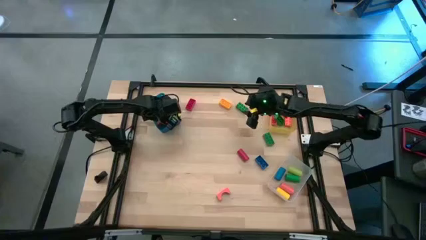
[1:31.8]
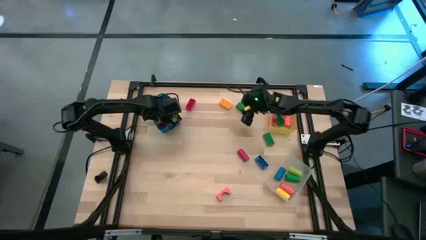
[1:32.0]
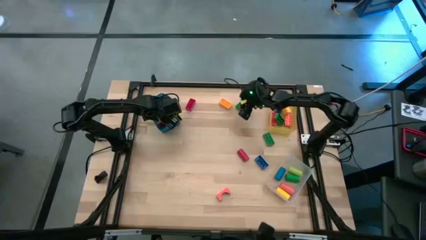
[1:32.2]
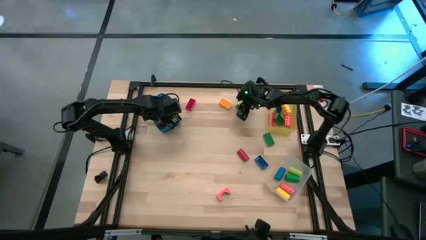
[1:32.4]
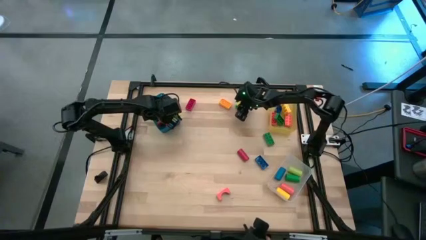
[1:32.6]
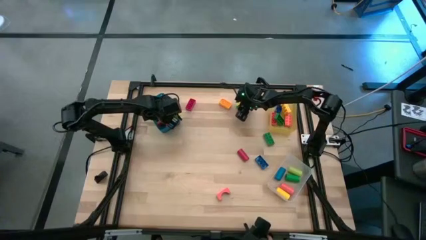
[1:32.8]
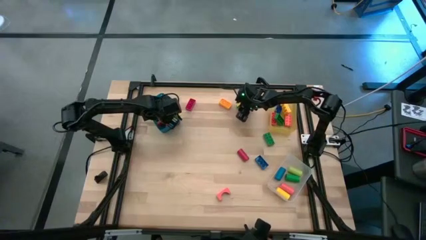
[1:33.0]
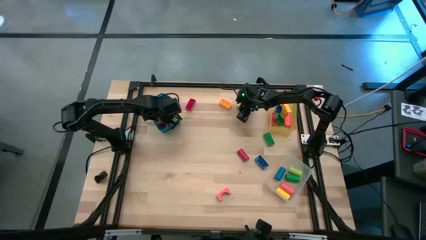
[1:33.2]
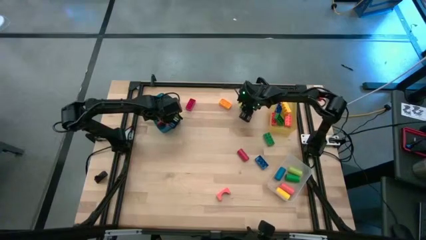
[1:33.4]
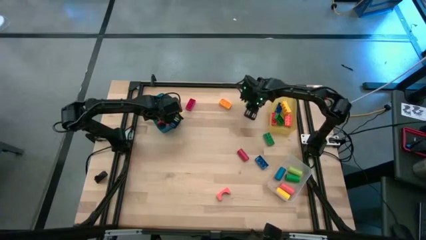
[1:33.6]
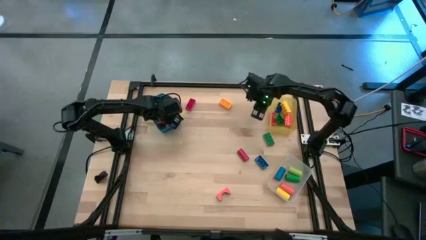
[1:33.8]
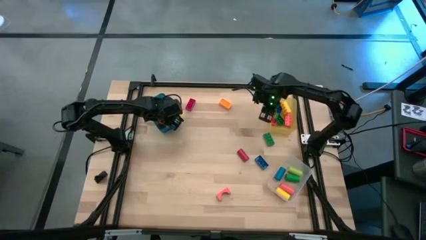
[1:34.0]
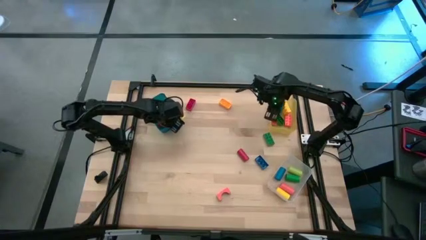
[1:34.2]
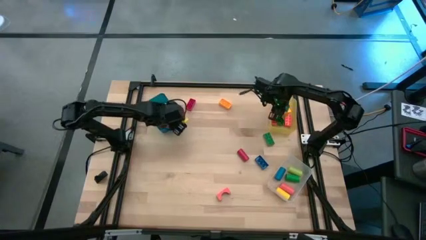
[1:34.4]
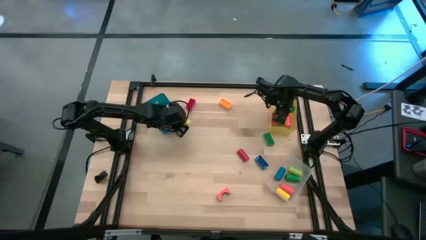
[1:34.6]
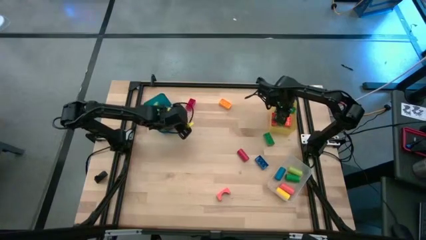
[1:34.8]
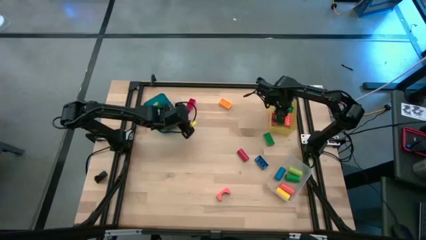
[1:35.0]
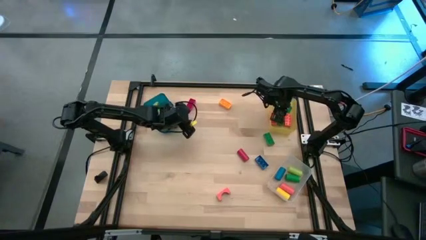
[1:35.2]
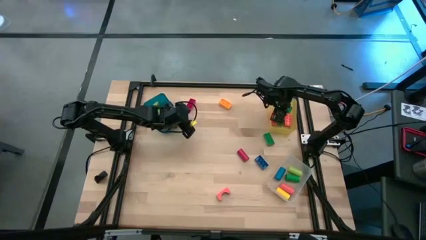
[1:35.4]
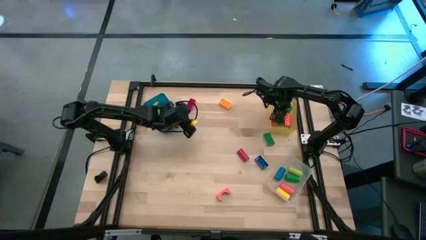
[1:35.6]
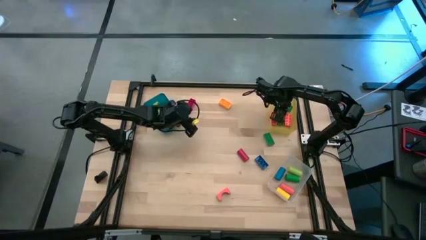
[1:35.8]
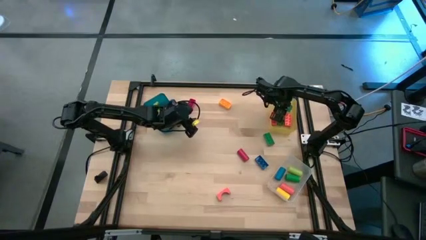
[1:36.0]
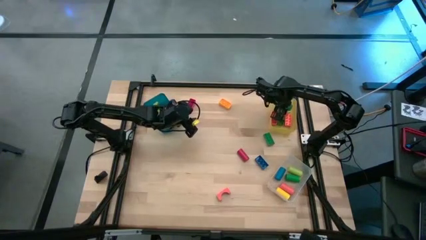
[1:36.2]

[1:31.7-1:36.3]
Task: Sort blocks by size
Put the green game piece into the yellow bin

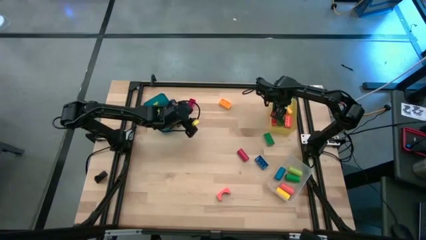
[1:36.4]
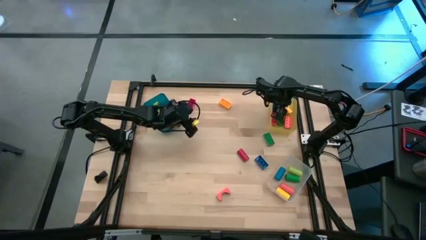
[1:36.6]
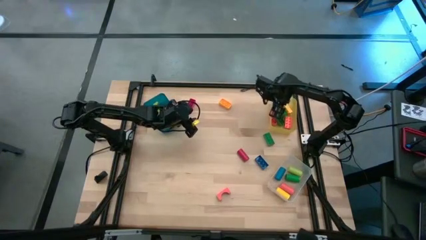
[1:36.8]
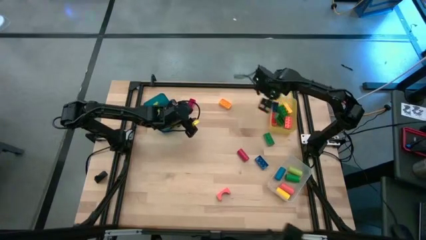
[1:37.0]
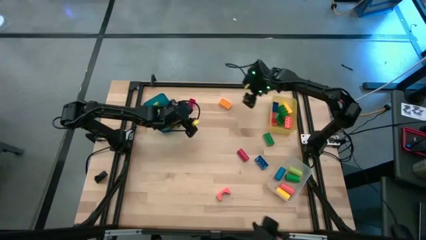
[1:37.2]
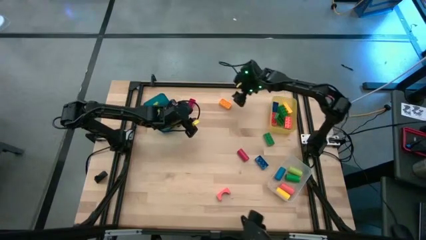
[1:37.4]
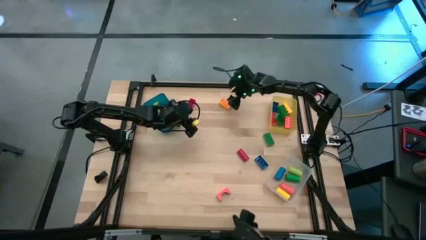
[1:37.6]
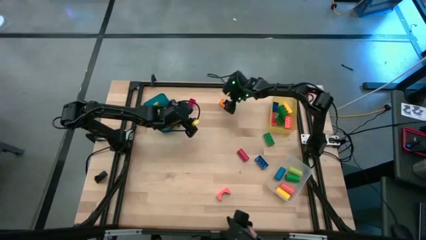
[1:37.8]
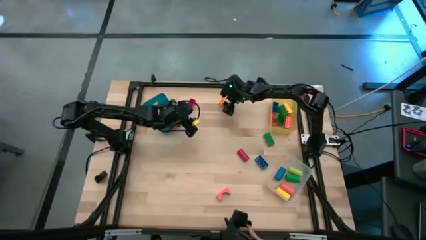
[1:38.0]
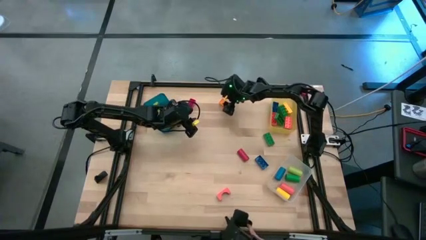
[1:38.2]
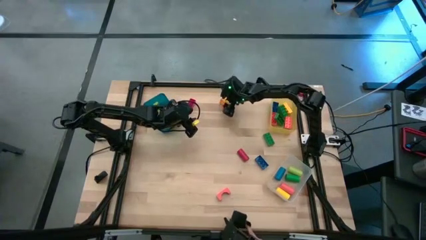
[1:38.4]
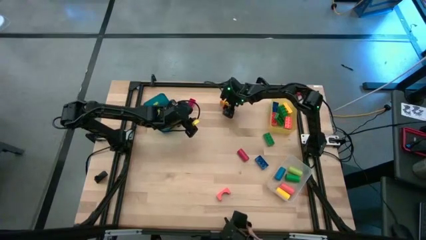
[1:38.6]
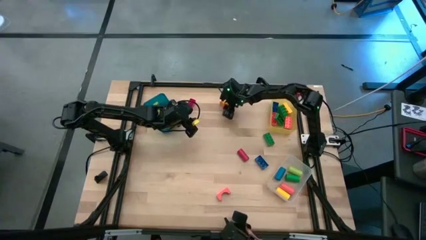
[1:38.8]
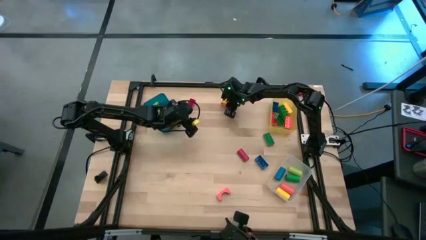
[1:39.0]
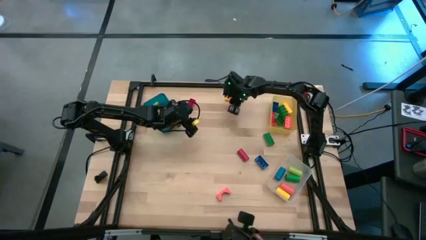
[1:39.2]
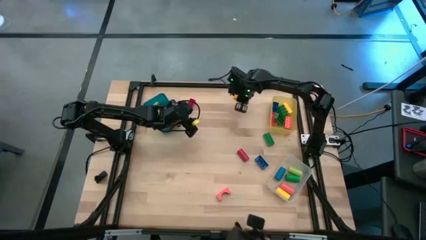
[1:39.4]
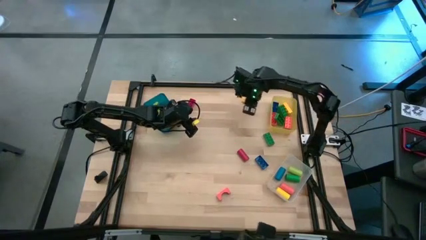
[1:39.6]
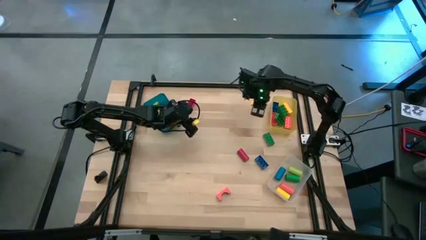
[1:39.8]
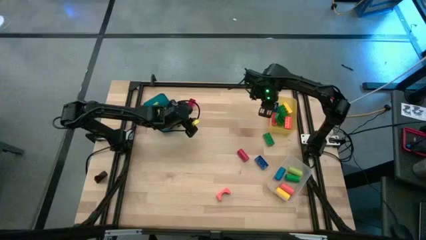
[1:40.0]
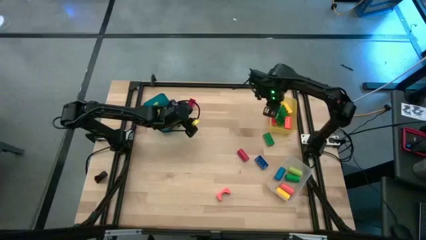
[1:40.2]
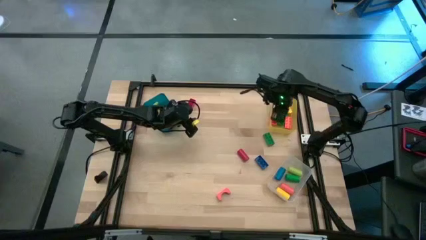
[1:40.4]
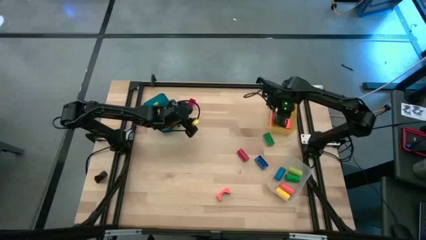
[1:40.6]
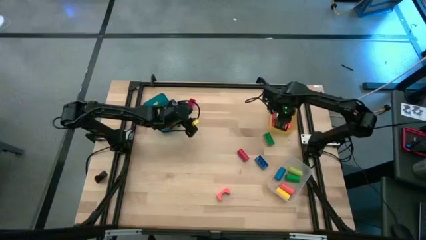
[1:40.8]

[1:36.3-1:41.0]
Put the yellow game piece into the yellow bin

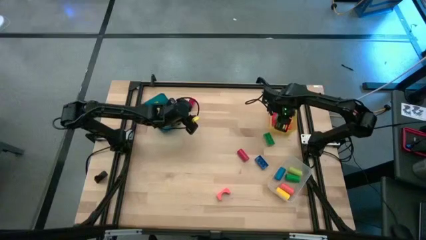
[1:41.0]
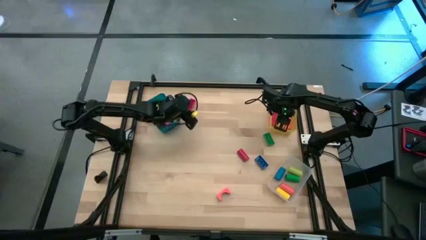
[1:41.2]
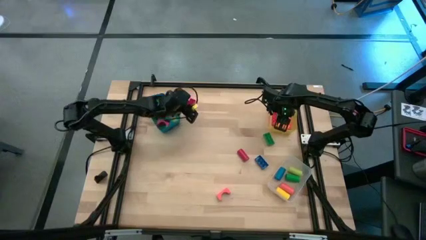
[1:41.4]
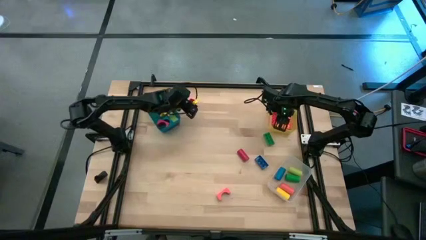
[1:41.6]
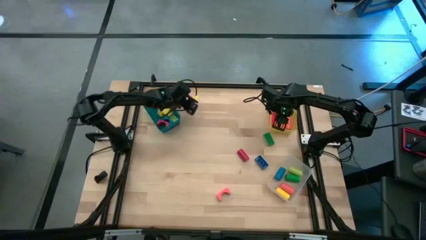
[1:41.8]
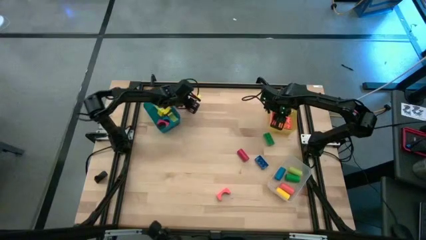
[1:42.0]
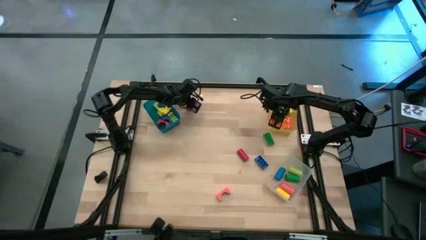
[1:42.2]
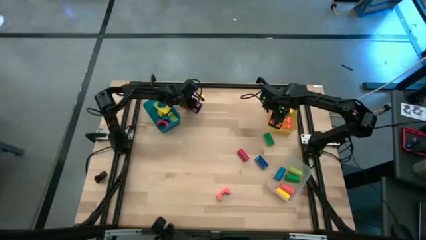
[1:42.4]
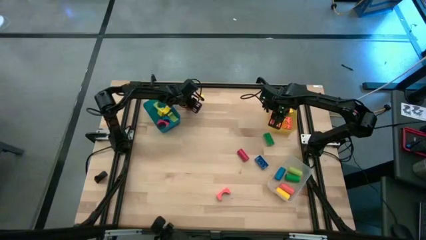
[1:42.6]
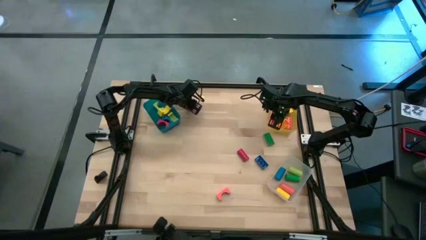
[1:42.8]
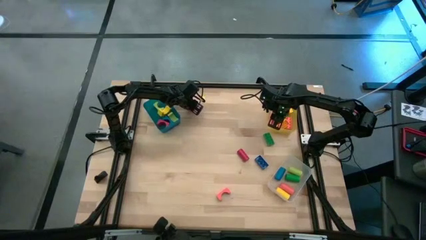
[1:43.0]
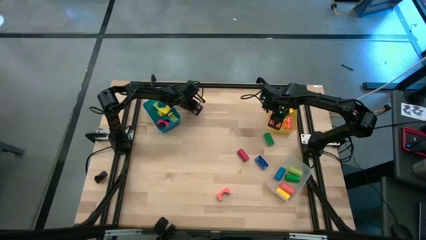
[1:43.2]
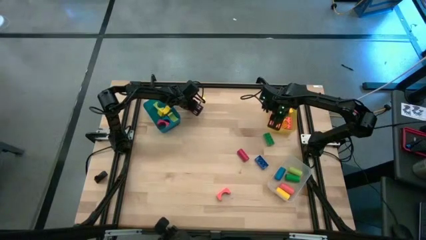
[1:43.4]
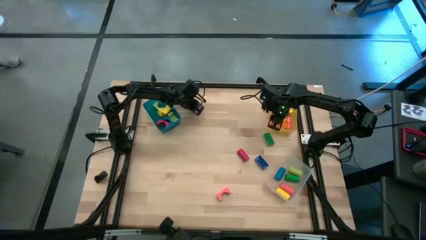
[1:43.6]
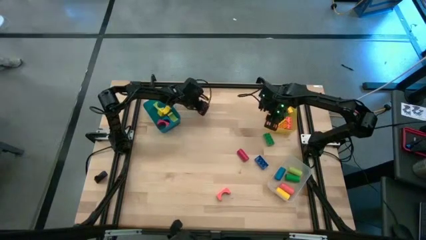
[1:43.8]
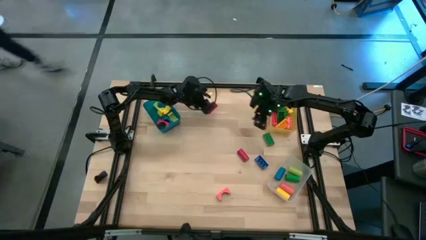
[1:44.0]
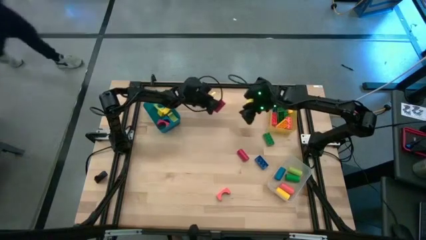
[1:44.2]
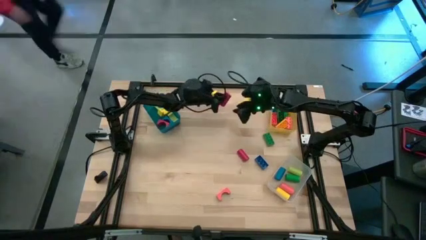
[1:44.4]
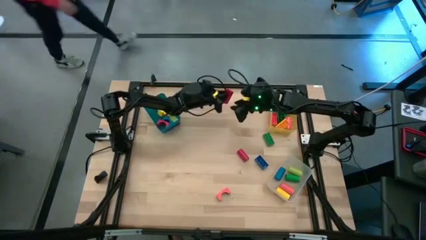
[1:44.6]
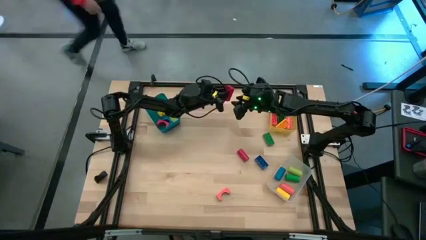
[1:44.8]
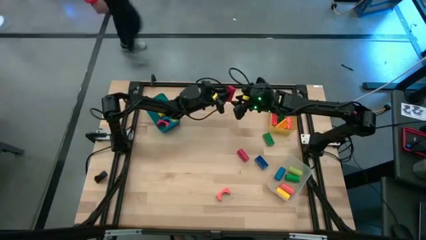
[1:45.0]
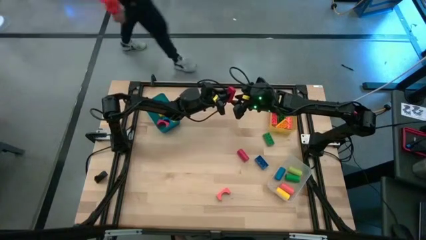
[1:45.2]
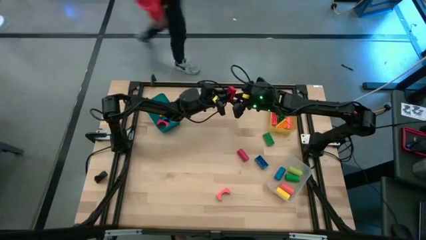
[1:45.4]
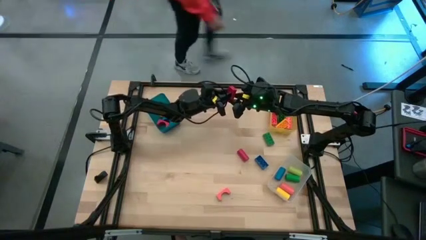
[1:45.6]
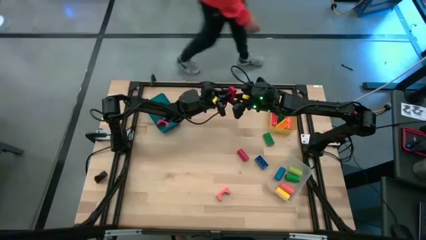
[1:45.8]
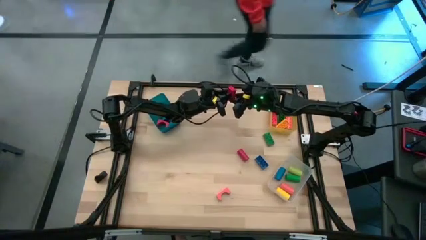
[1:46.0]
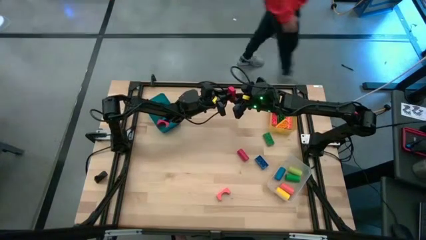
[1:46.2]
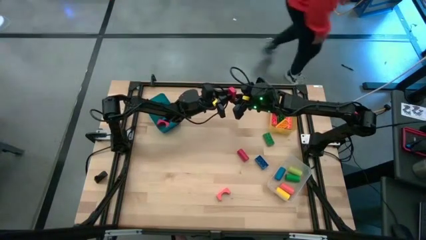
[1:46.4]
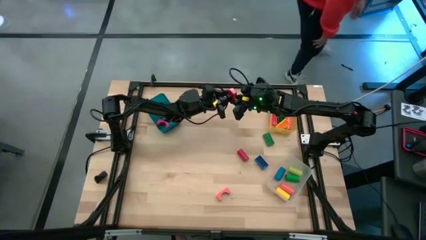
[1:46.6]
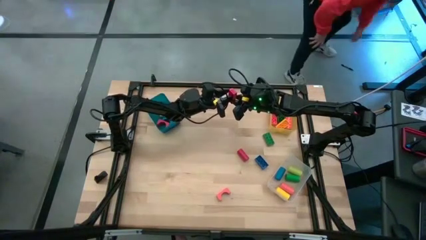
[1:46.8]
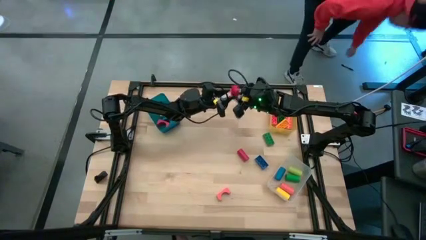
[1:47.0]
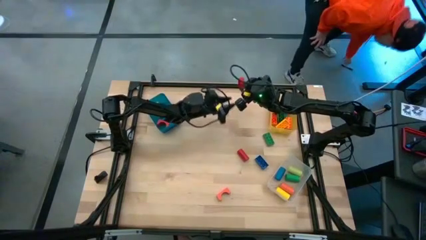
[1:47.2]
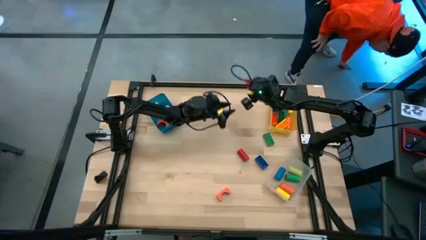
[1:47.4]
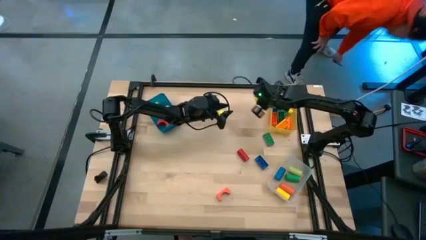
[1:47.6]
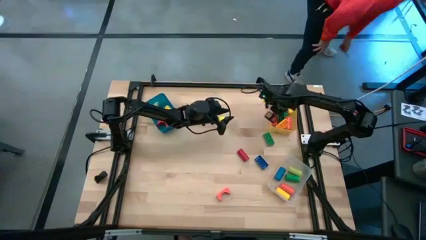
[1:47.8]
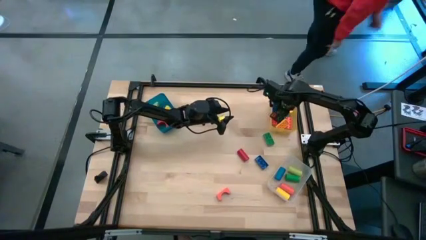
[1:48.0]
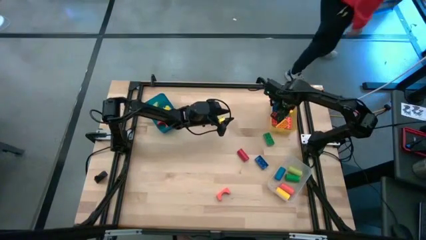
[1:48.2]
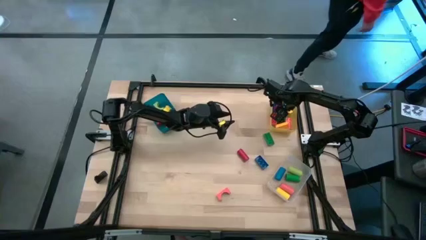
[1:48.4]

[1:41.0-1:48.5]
Put the red game piece into the yellow bin
